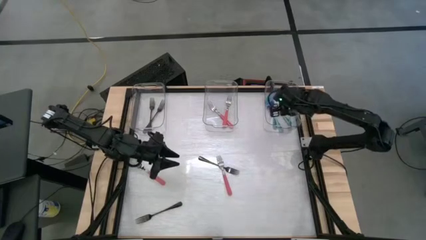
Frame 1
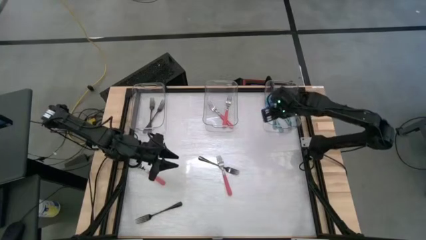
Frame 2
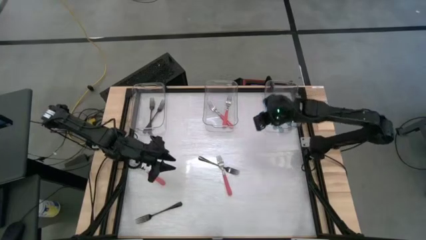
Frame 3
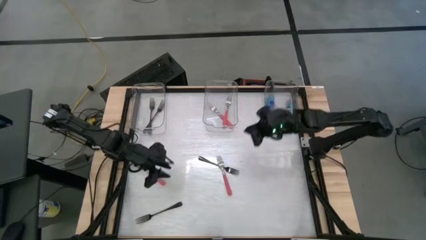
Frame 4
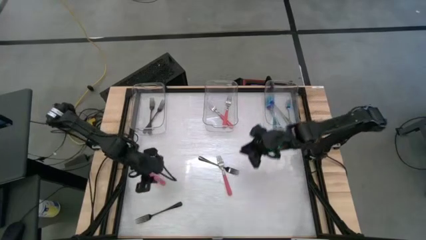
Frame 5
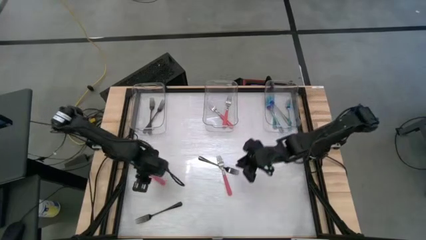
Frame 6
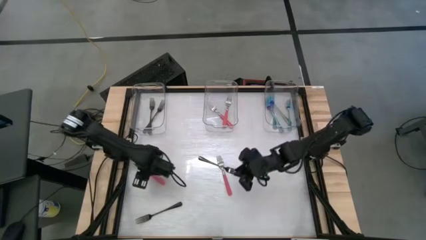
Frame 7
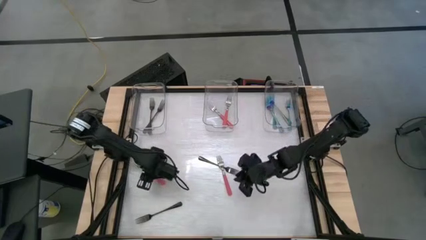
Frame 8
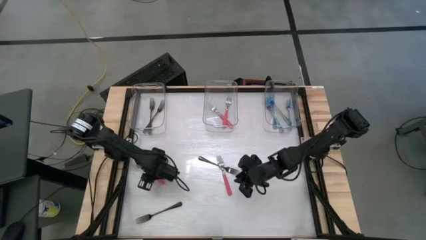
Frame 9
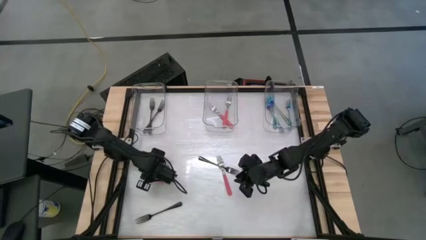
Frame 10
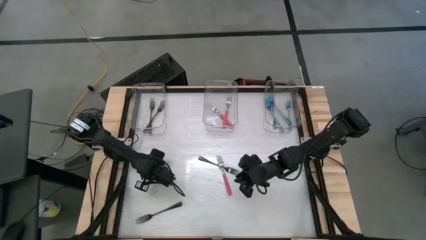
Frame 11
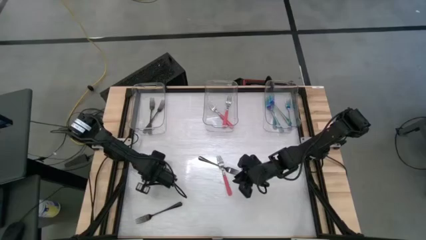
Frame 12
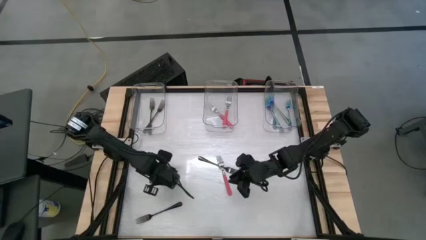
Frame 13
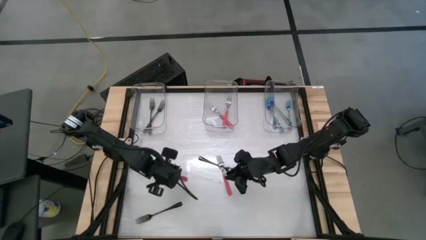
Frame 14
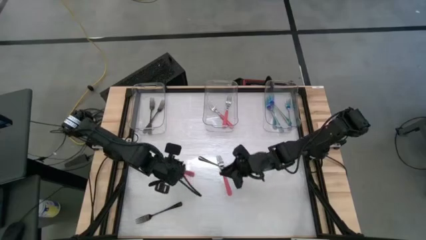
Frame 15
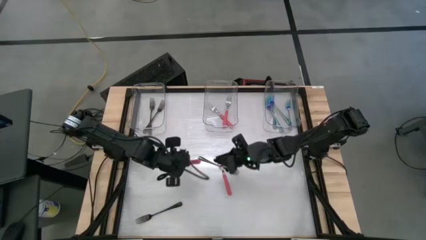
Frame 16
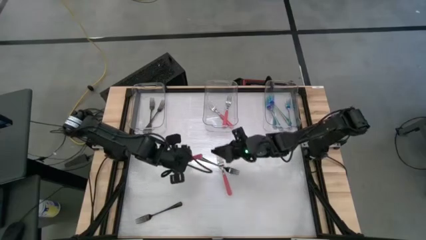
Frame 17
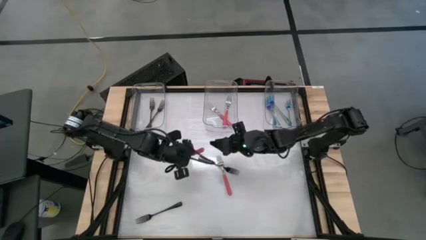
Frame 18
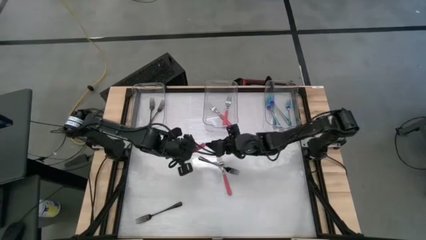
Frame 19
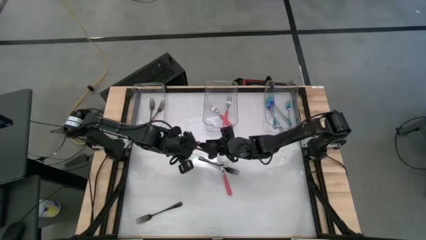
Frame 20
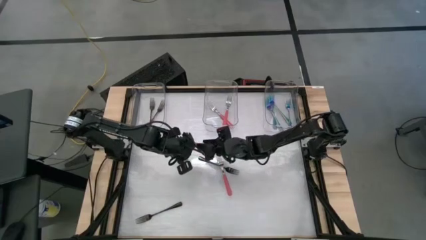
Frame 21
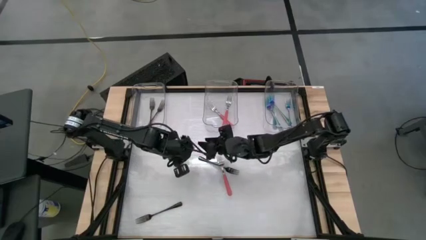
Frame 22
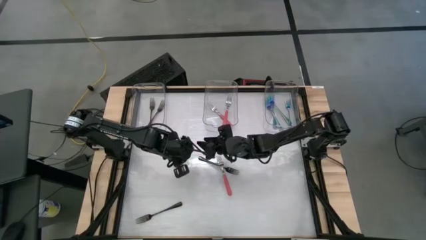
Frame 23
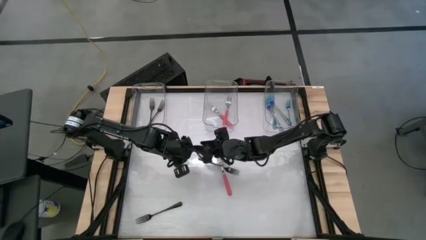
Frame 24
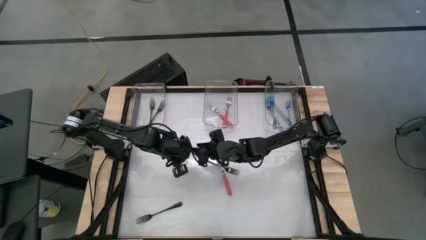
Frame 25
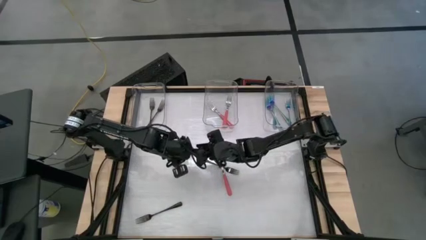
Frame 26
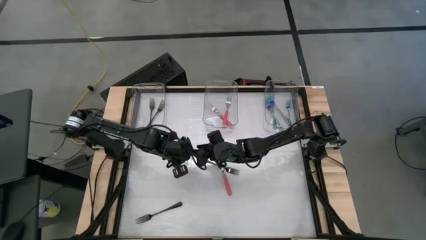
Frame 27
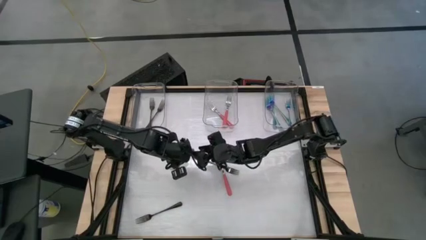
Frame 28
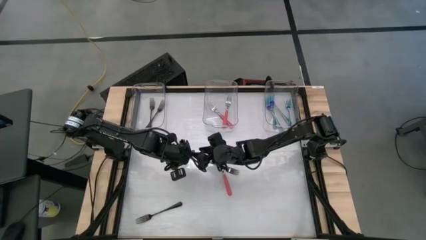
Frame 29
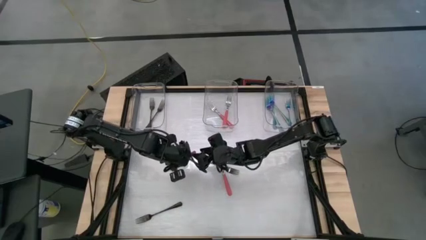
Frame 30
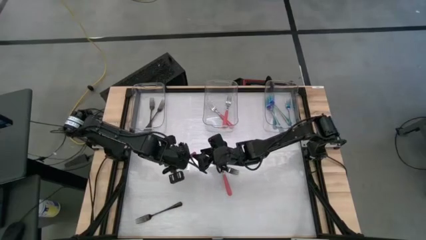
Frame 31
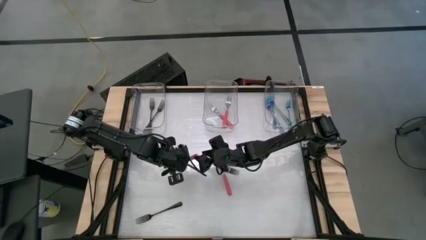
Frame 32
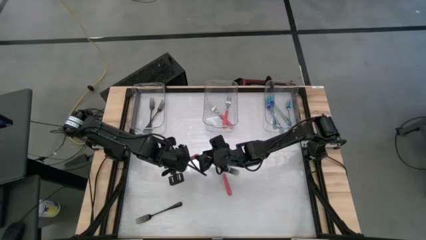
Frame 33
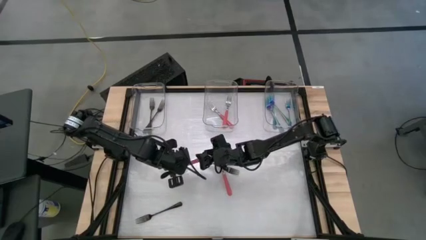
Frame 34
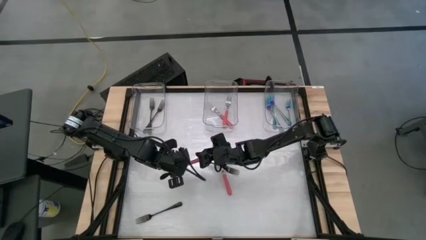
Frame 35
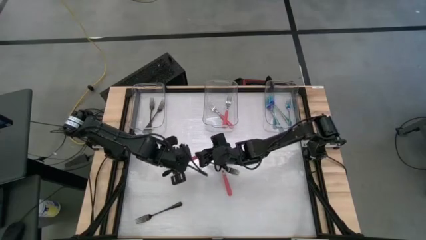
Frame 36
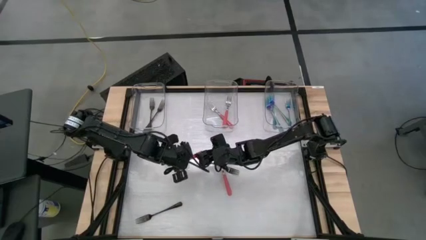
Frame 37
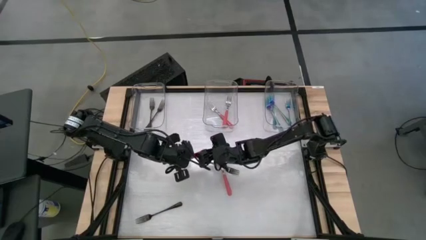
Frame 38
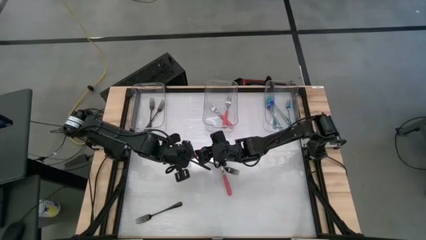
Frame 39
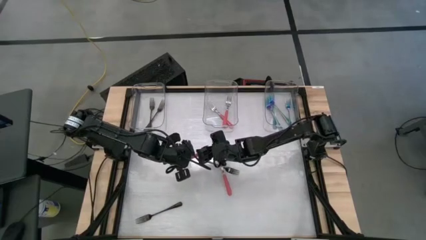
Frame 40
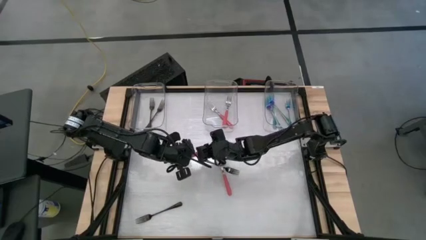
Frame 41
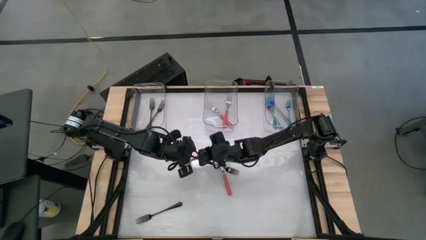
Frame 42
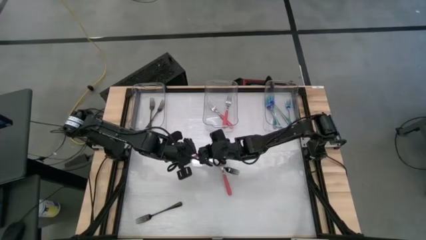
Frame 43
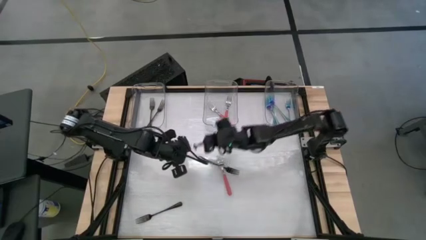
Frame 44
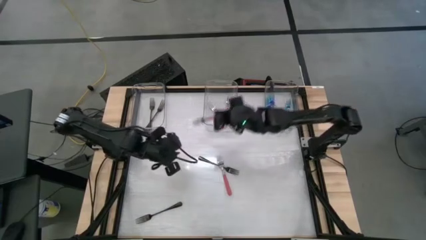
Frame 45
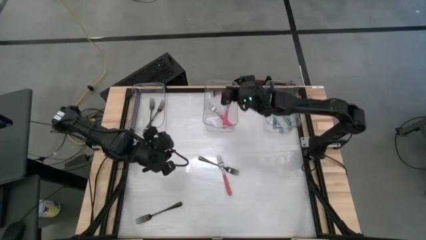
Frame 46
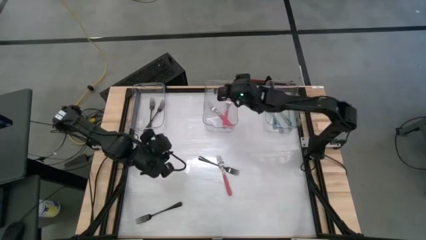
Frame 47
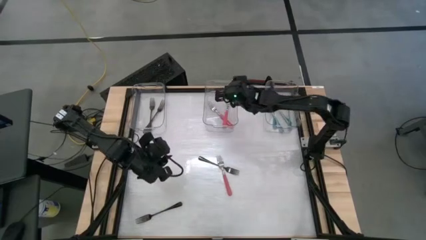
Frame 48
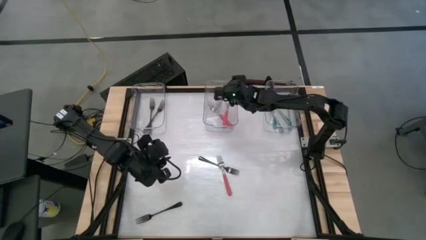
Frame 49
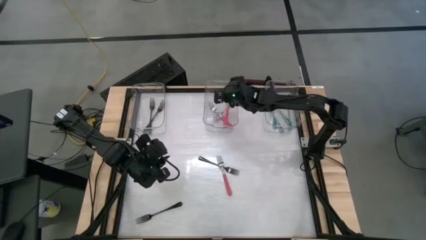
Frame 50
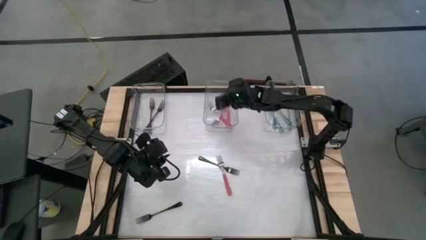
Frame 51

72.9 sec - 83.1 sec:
Task: Sort silverware by color (type)
Put the left pink fork into the middle transparent bin

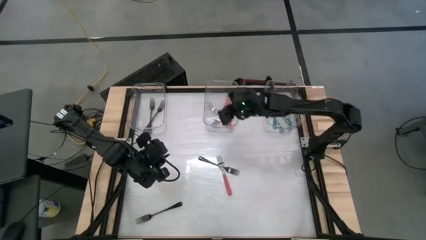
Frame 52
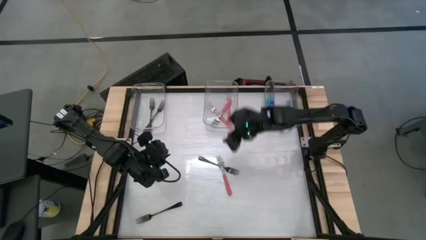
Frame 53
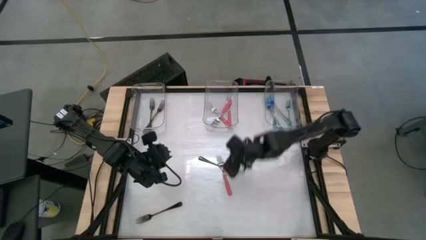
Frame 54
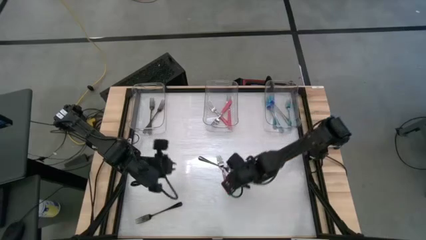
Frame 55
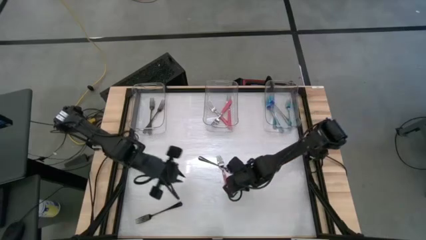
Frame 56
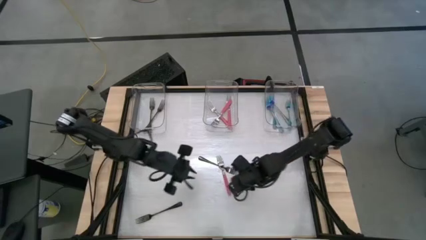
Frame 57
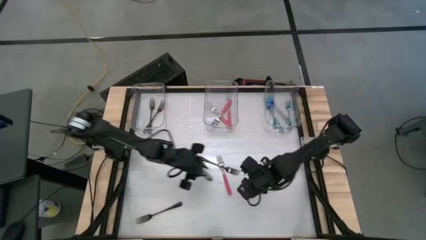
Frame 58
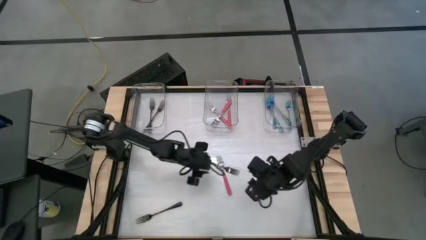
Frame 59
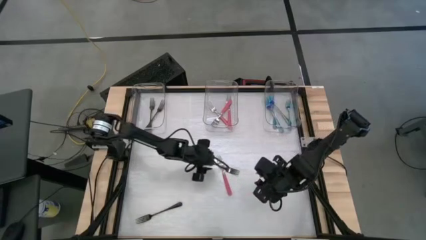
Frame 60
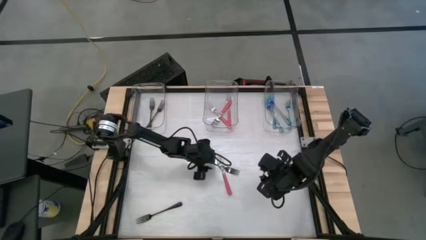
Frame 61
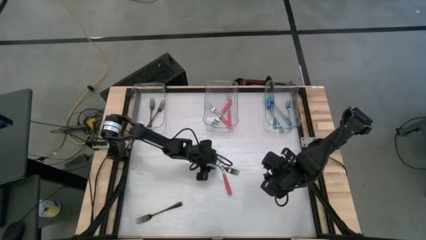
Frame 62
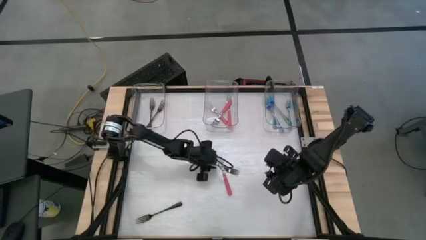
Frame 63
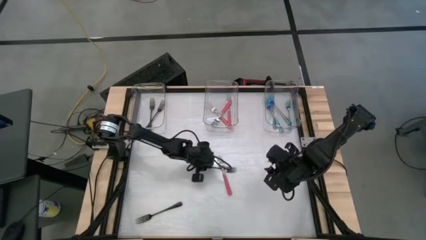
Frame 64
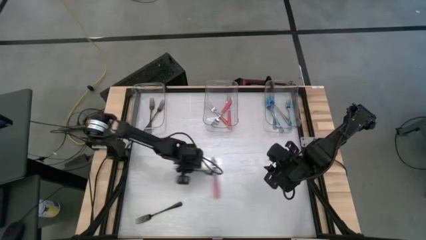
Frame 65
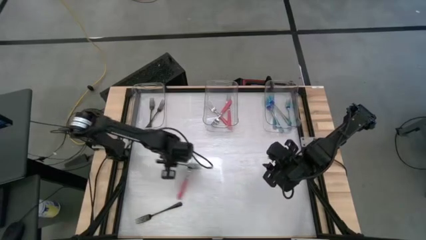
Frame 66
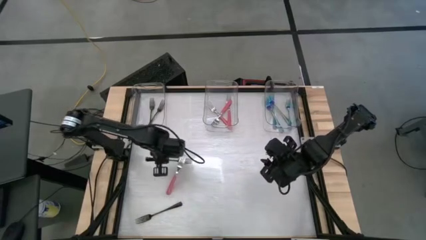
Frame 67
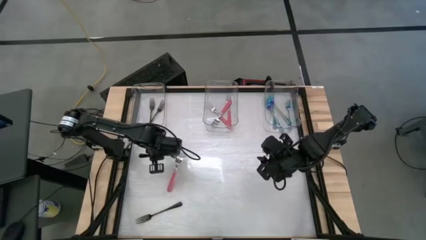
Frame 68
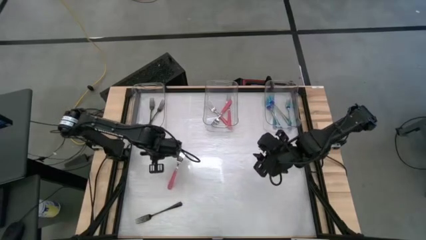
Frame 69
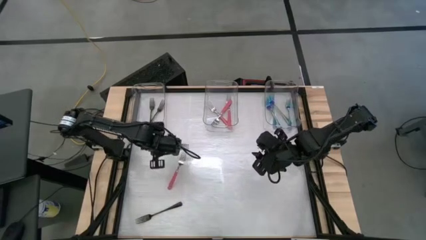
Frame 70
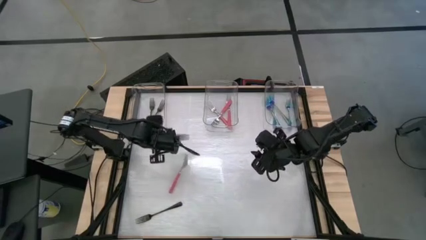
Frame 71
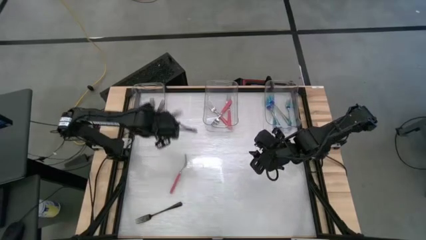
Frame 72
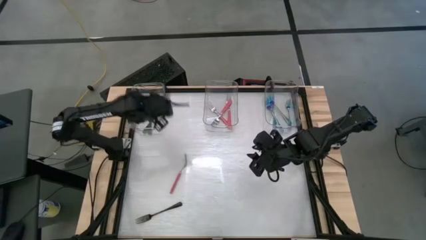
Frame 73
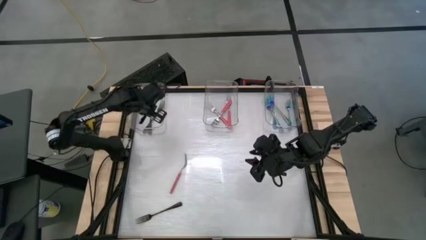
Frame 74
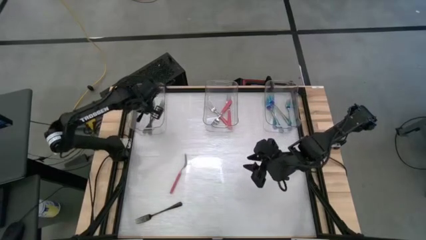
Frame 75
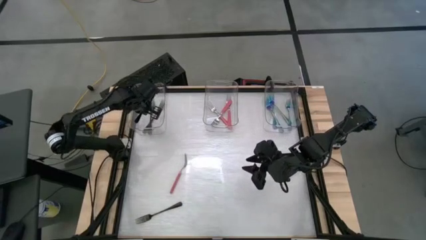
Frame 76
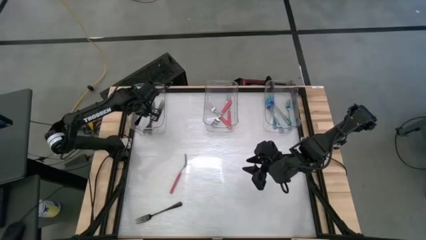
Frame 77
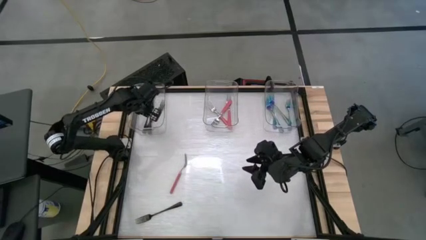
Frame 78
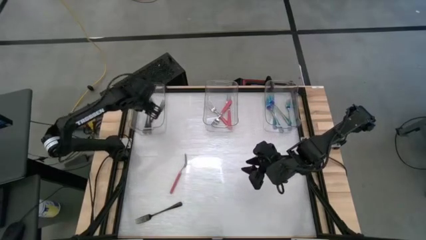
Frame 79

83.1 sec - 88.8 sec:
Put the top black fork into the left transparent bin

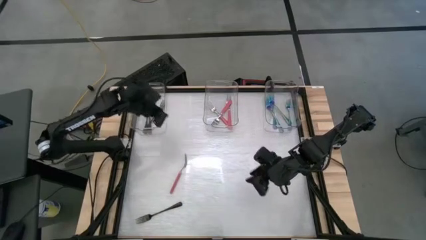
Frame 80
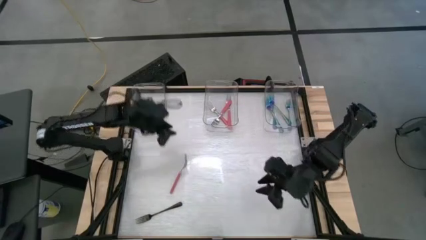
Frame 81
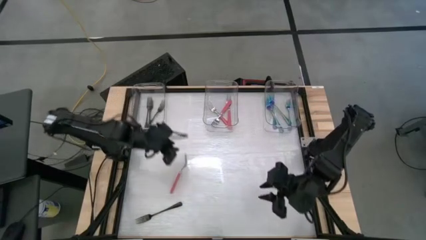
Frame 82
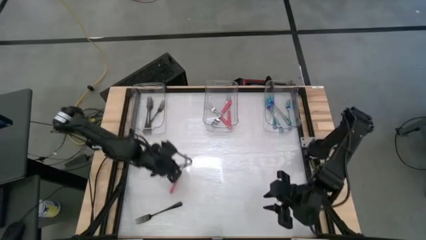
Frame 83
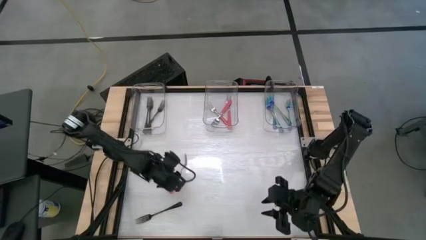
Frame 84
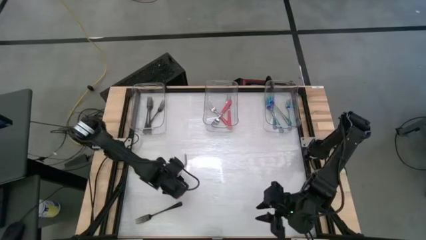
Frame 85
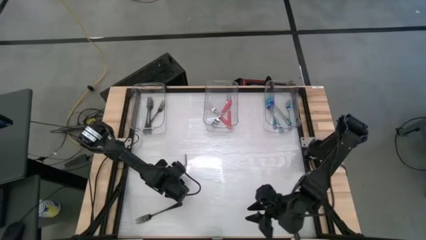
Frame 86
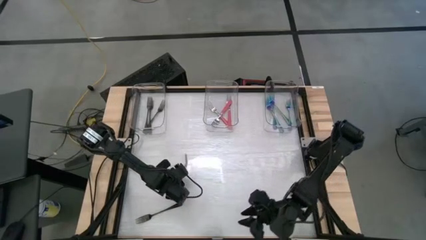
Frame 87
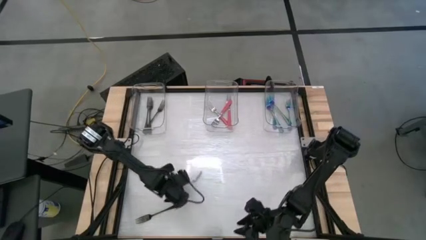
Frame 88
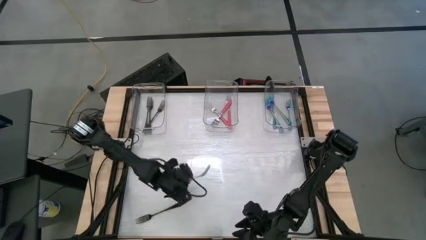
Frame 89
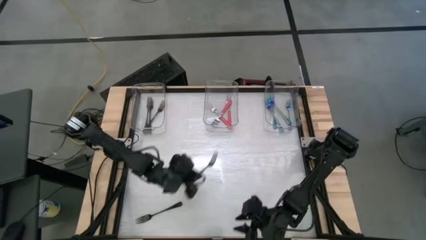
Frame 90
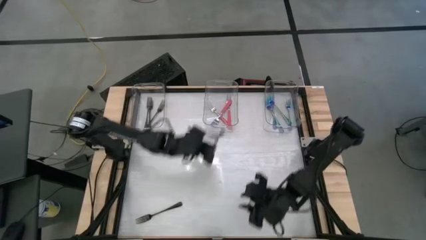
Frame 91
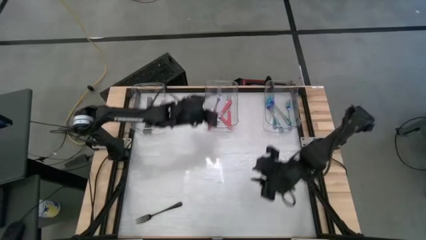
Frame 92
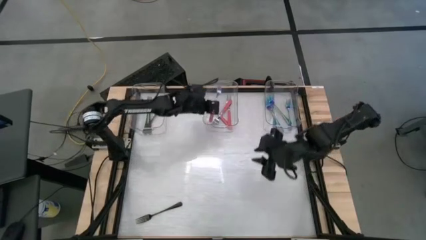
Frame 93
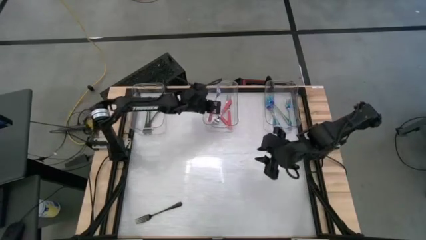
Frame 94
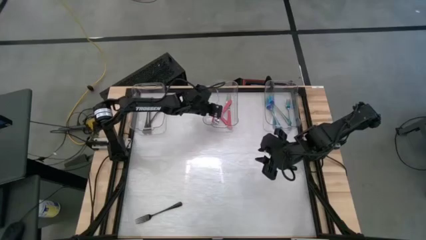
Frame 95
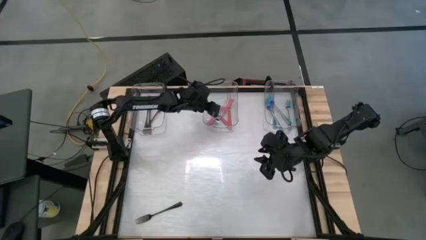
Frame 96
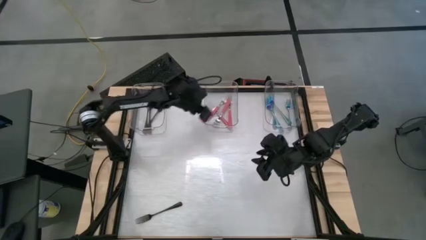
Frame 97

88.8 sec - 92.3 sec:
Put the pink fork into the middle transparent bin
